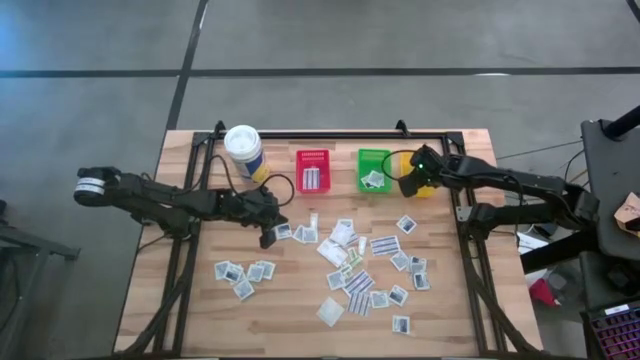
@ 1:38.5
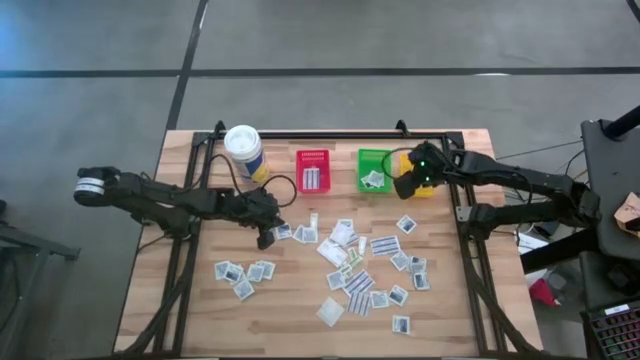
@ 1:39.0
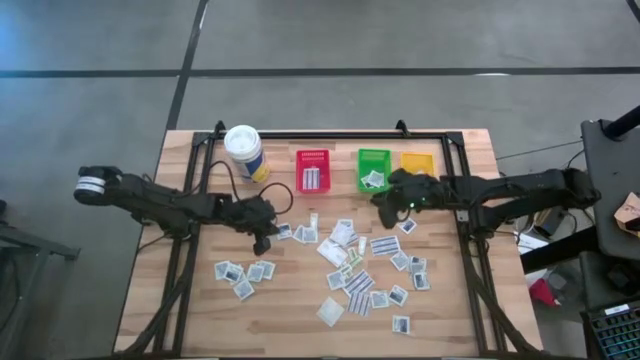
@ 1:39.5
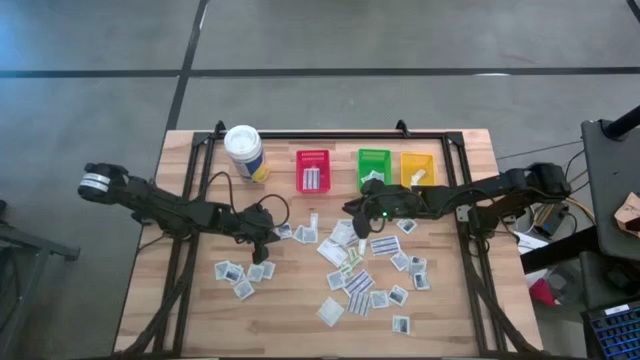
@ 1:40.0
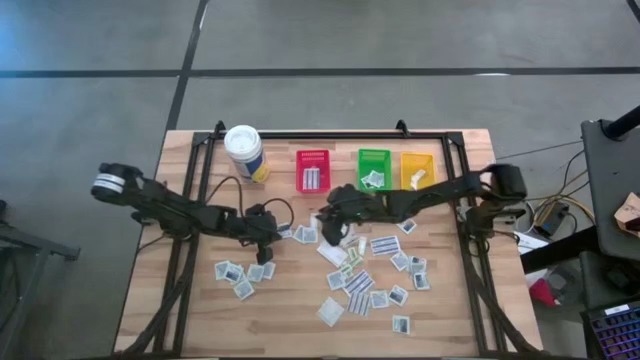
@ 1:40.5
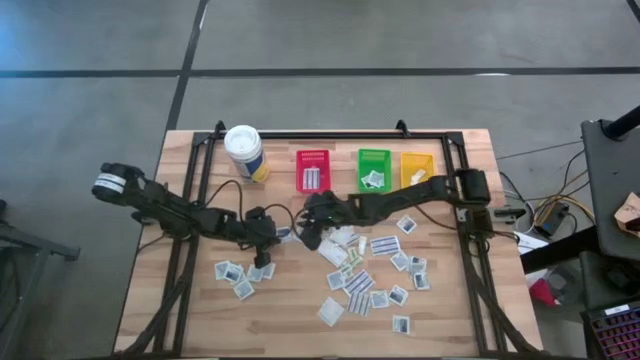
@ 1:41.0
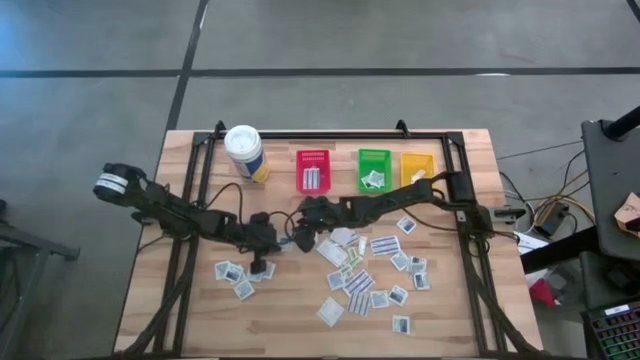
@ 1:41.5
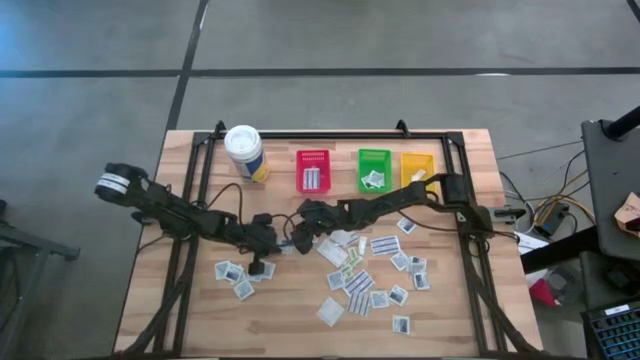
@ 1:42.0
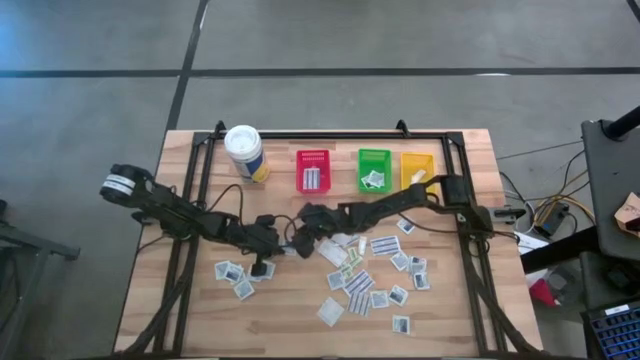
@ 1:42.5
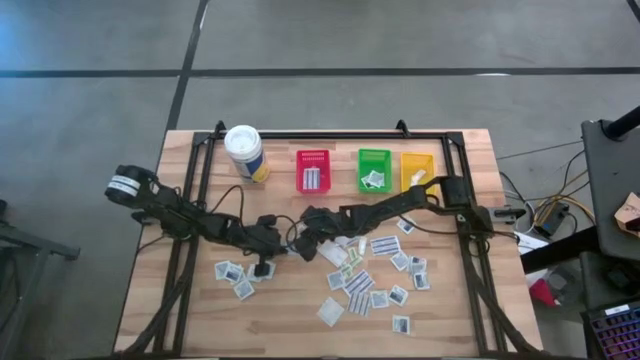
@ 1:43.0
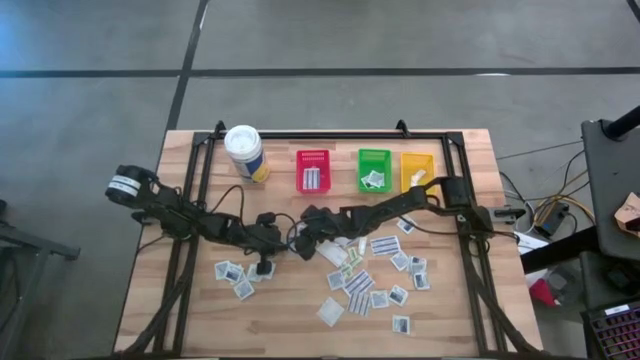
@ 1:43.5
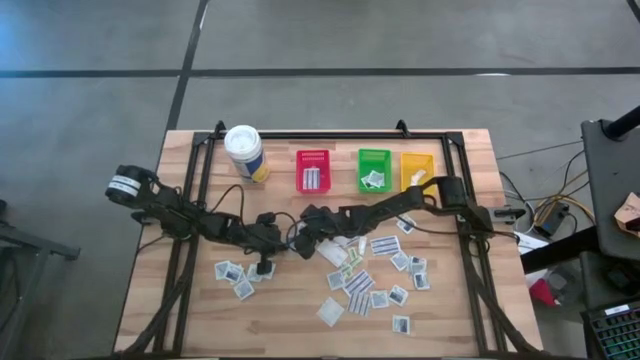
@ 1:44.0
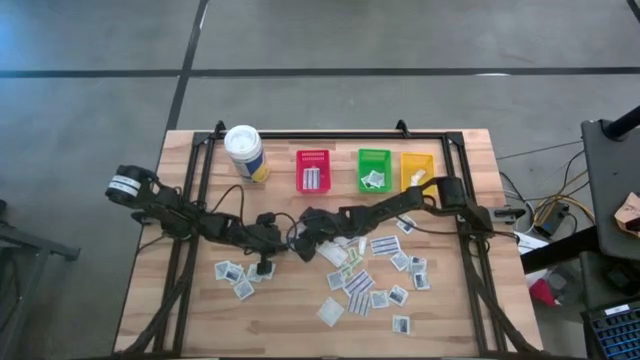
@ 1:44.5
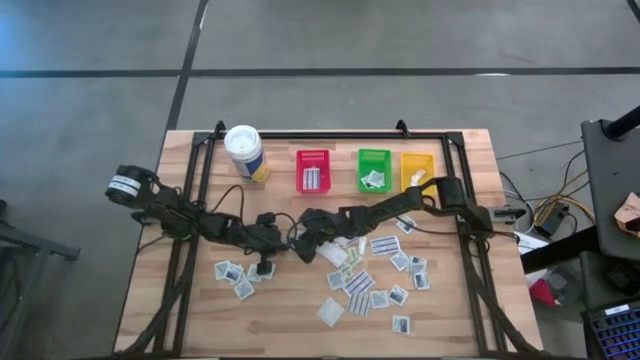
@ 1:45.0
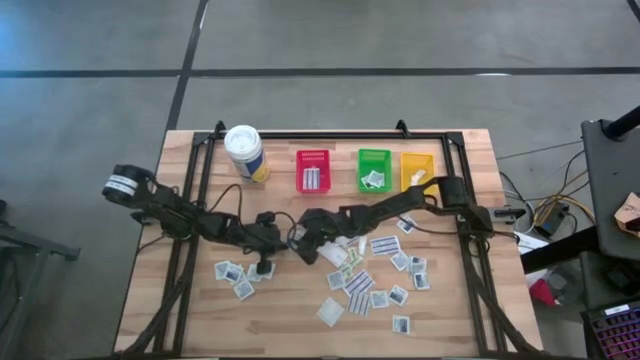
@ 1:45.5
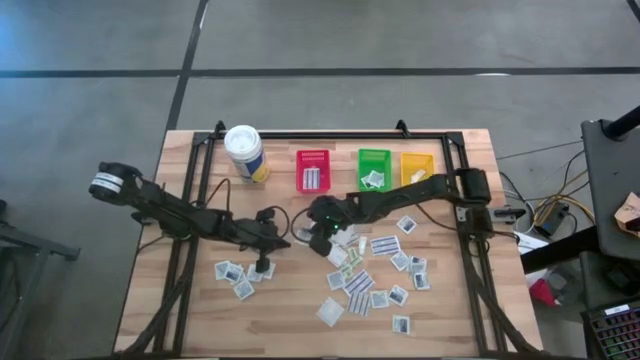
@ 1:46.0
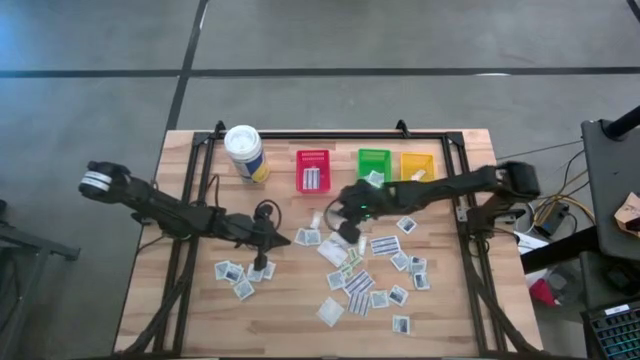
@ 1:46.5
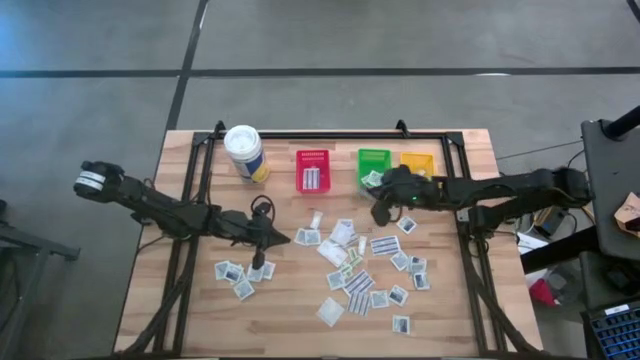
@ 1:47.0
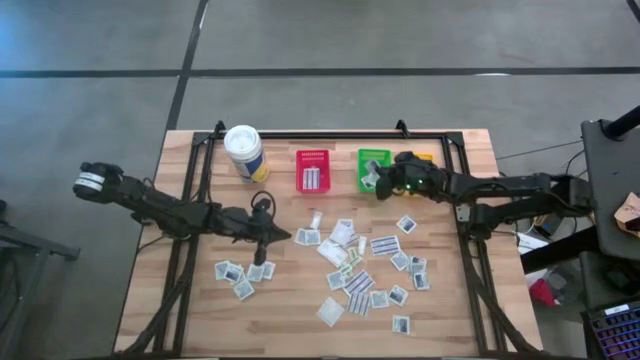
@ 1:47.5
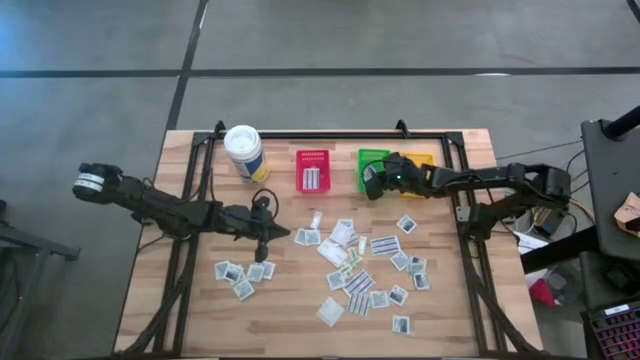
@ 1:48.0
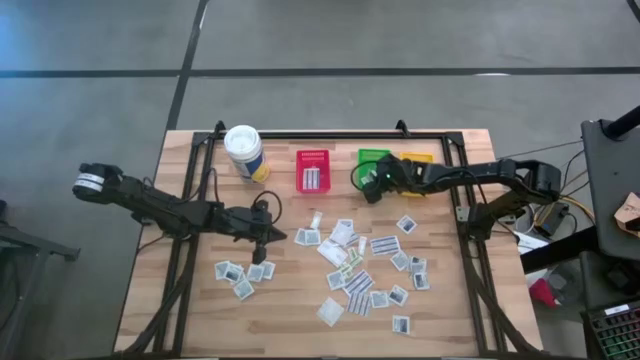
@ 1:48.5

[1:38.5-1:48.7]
Task: Pick & Place First Aid Supplies
Put the alcohol pad in the green bin

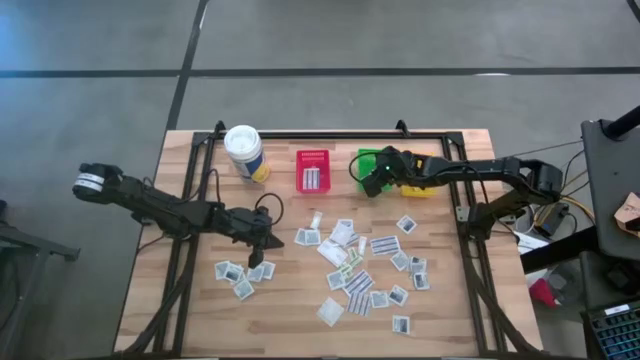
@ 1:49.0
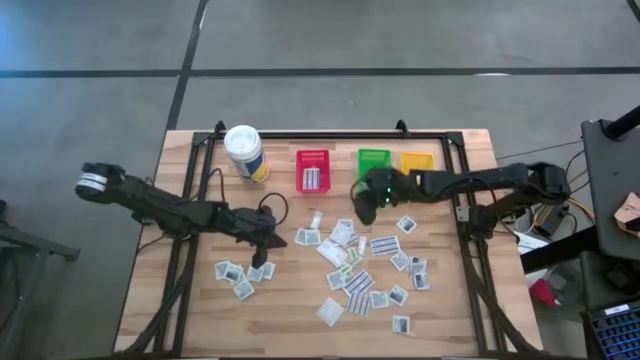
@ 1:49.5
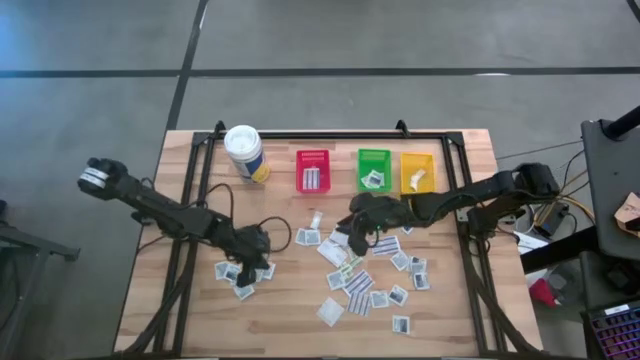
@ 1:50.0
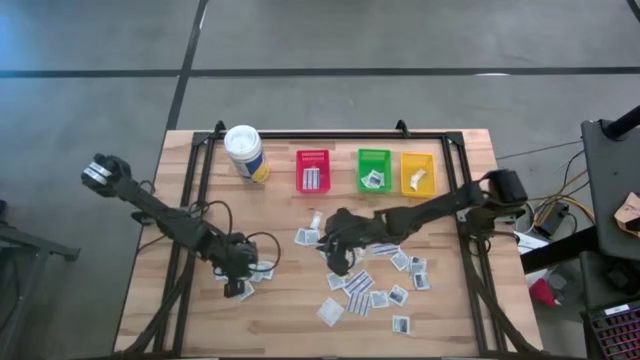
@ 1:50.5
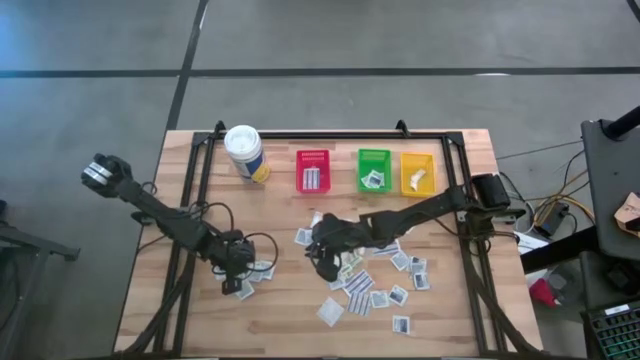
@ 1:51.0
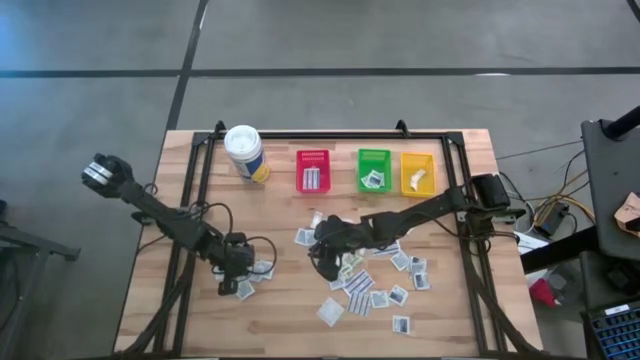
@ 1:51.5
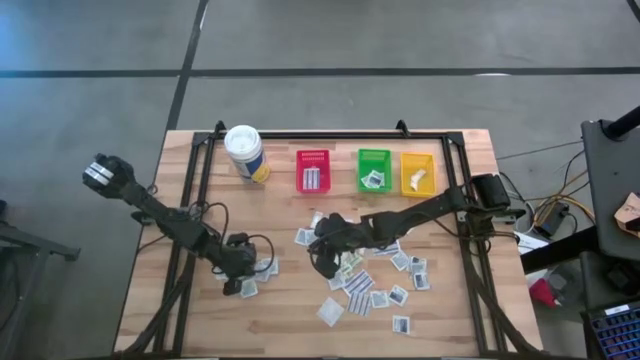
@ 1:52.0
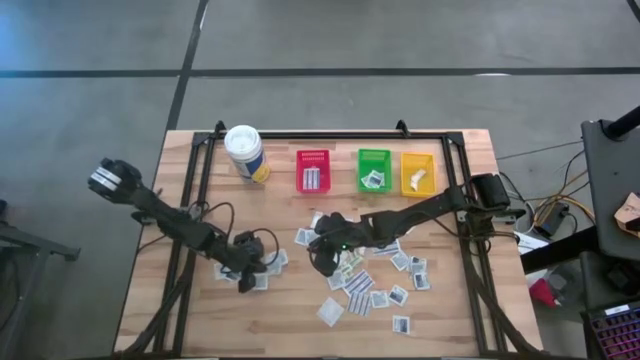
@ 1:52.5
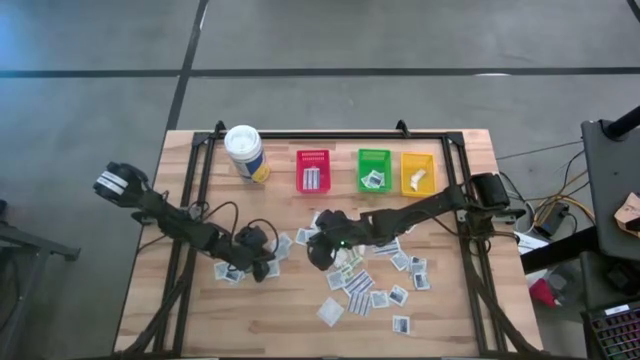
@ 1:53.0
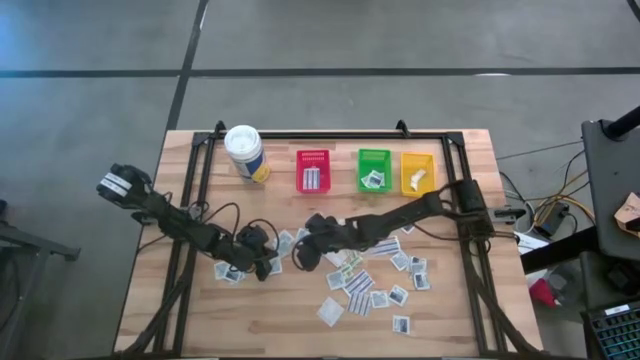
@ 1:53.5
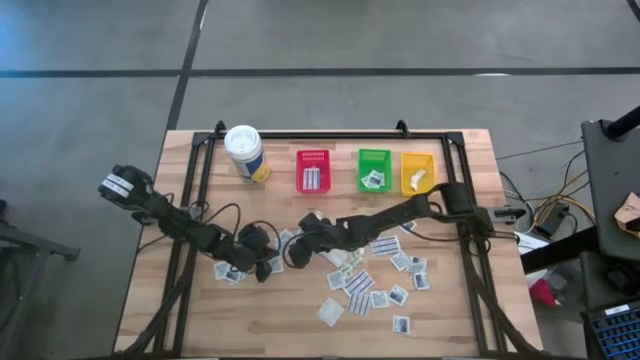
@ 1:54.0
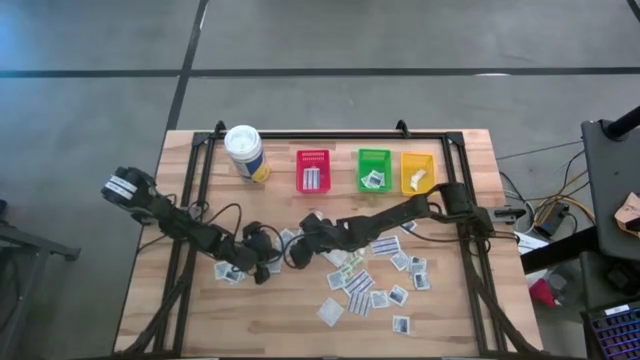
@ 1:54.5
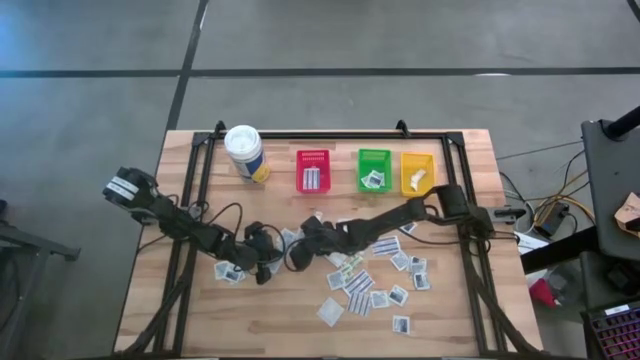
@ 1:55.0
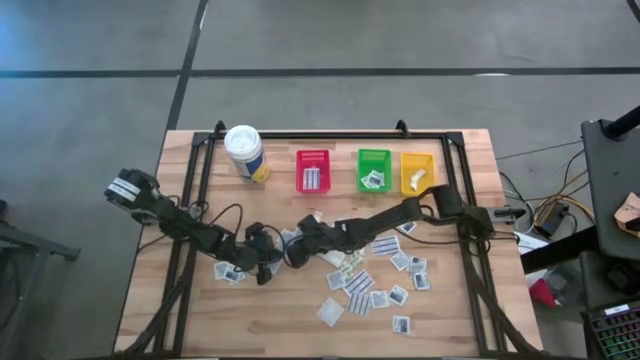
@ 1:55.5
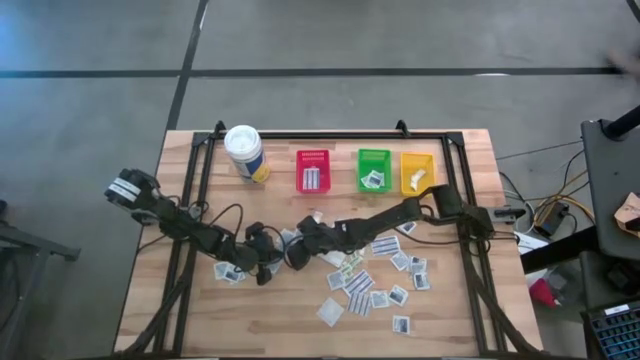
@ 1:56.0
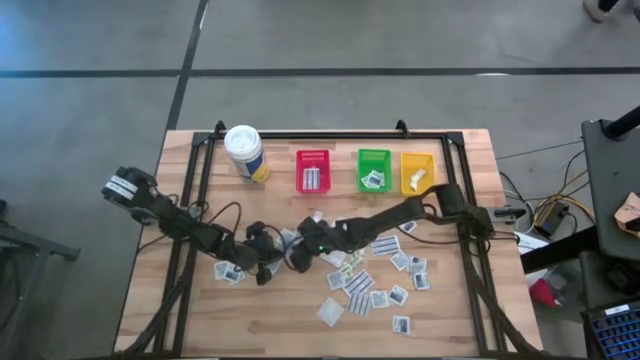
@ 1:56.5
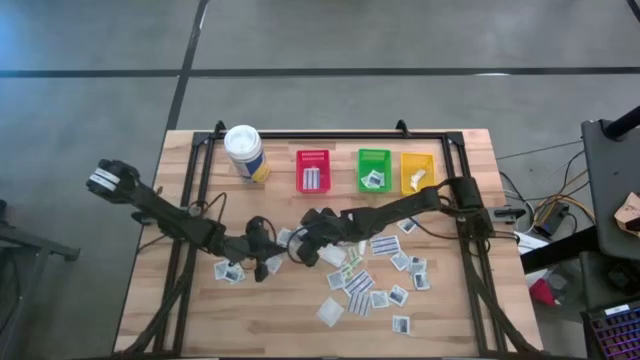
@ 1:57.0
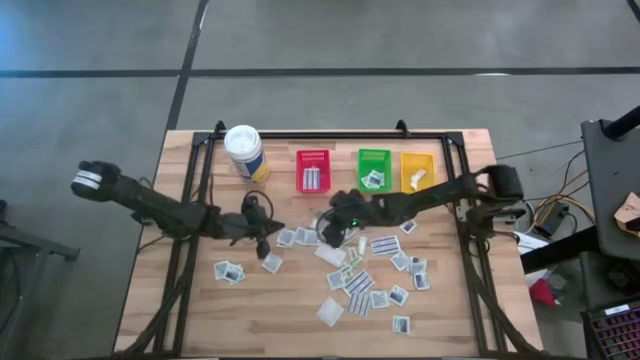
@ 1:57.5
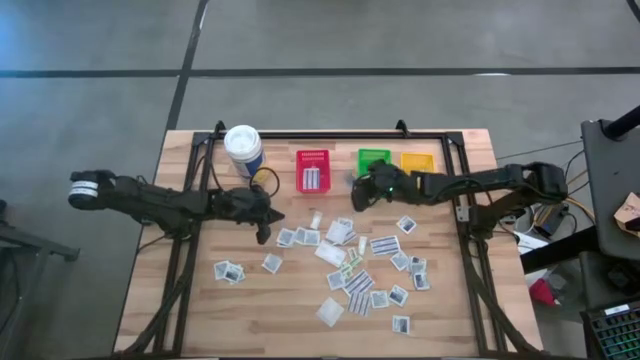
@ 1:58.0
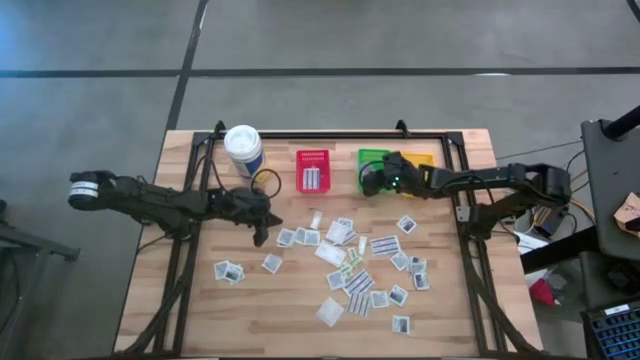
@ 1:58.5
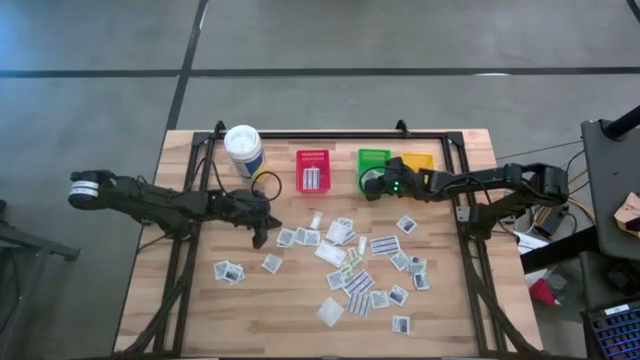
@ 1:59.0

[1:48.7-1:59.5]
Put the alcohol pad in the green bin
